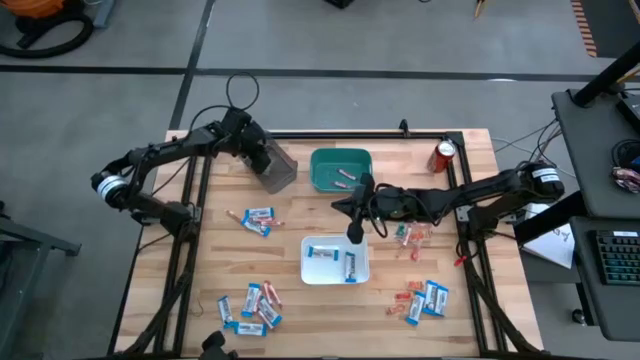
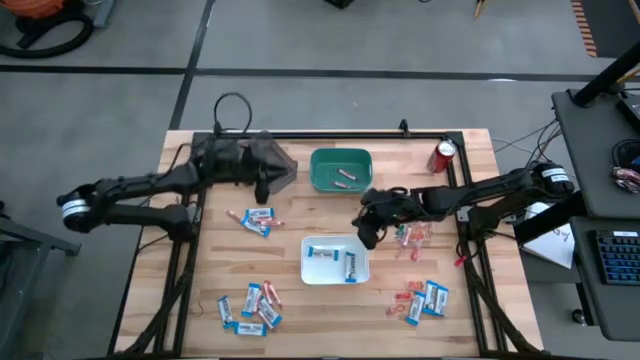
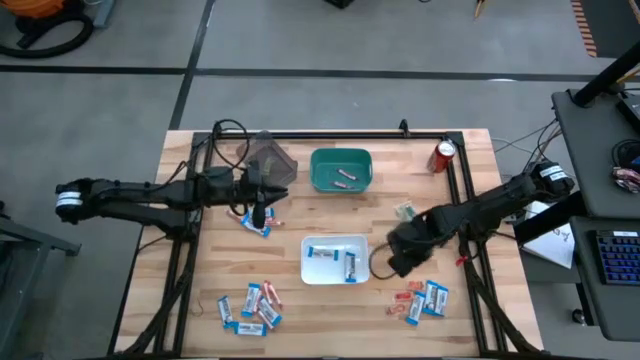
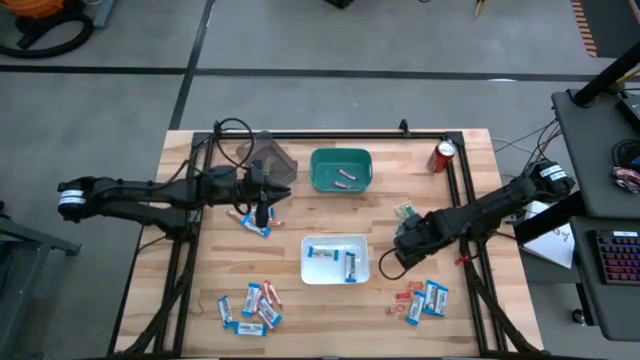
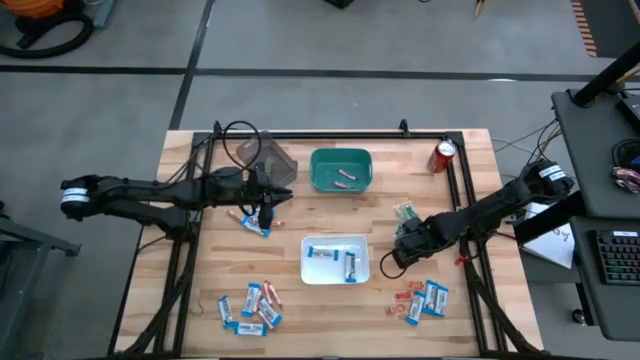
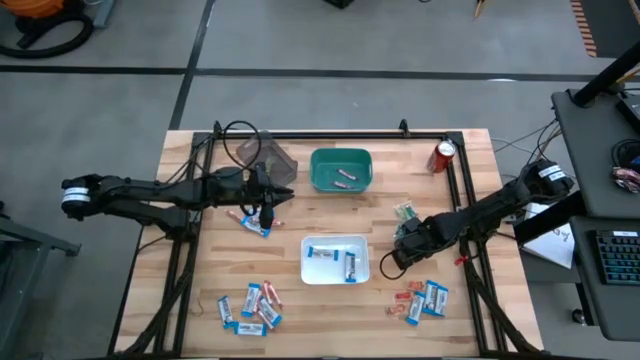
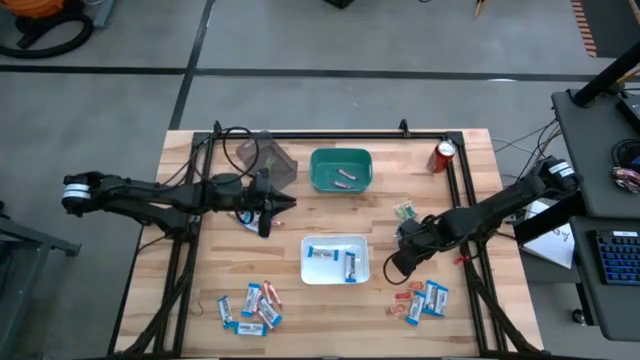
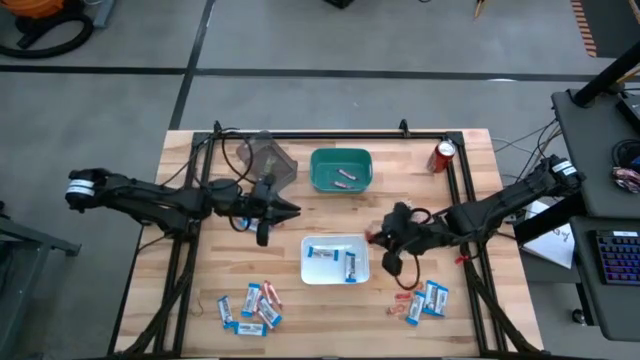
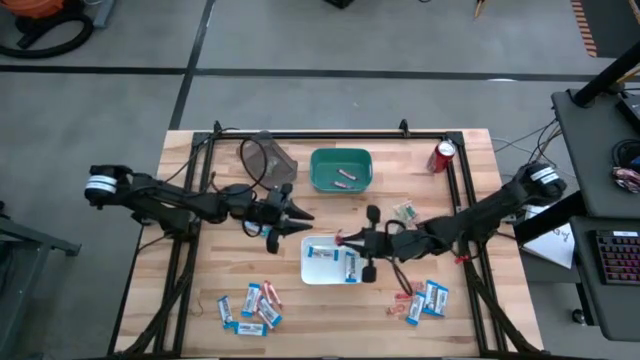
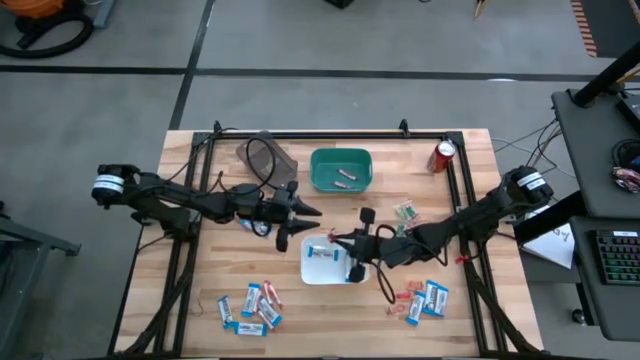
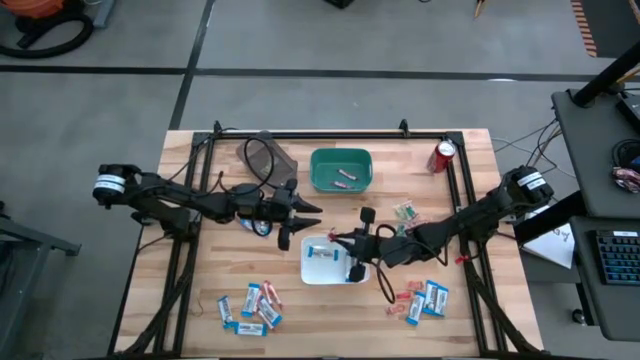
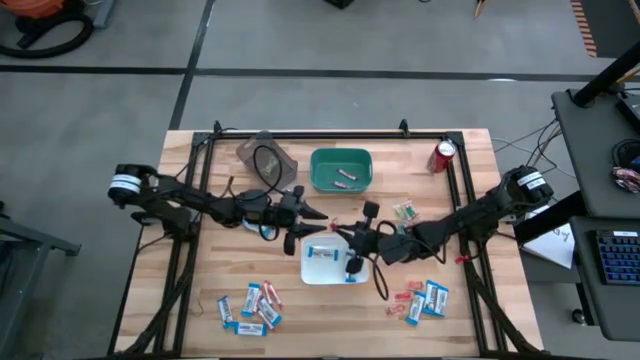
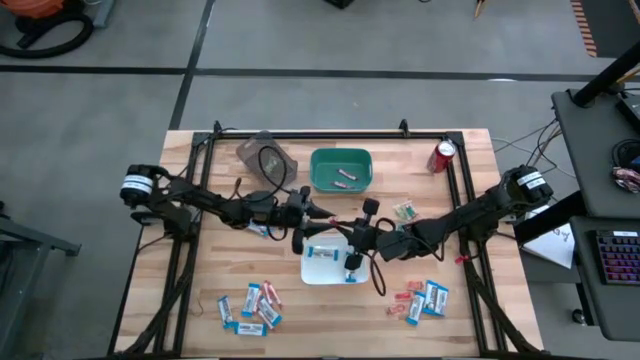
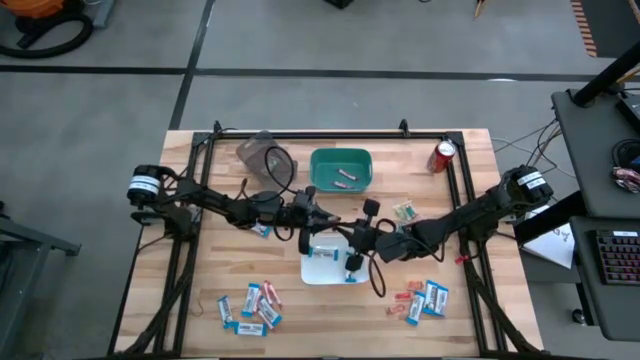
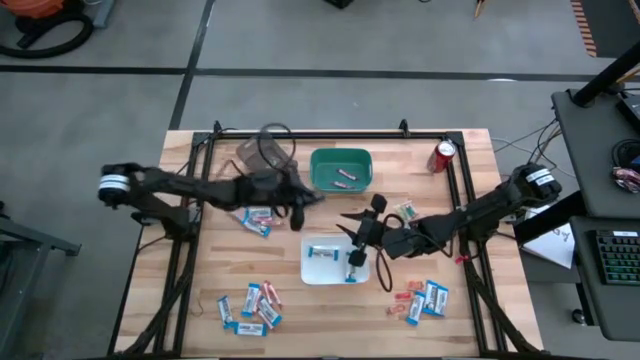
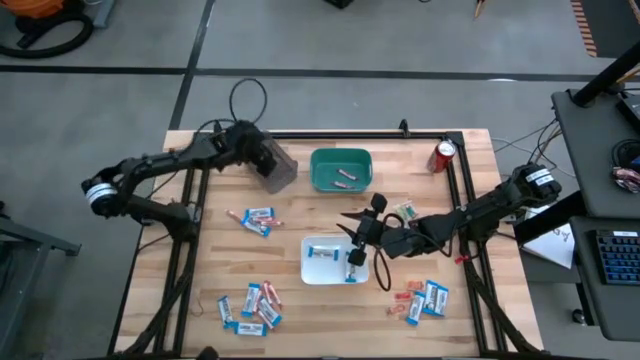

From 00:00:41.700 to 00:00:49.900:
Task: Sort candy
Put the red gummy into the black bin

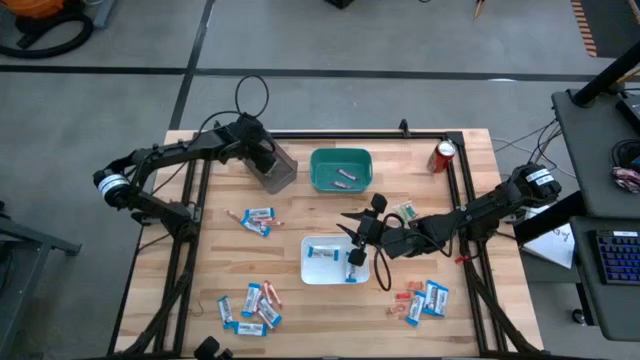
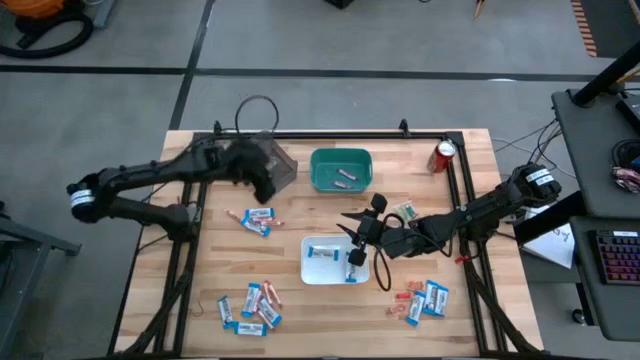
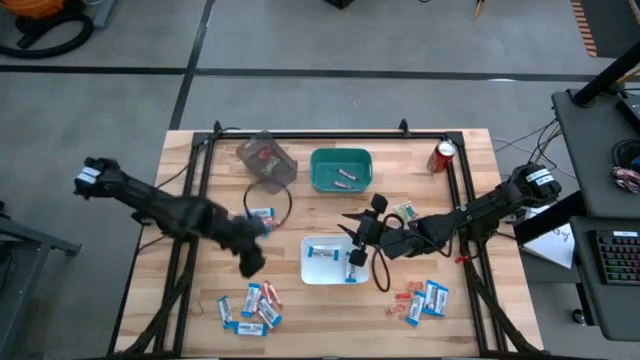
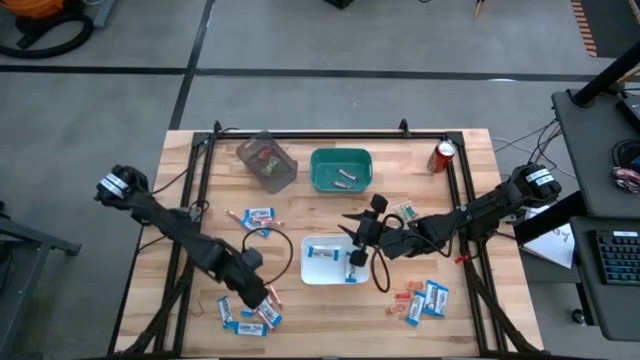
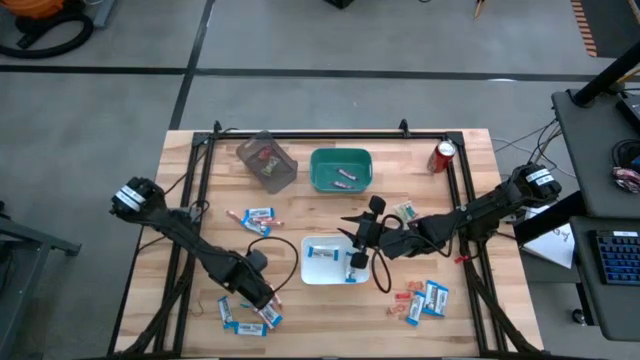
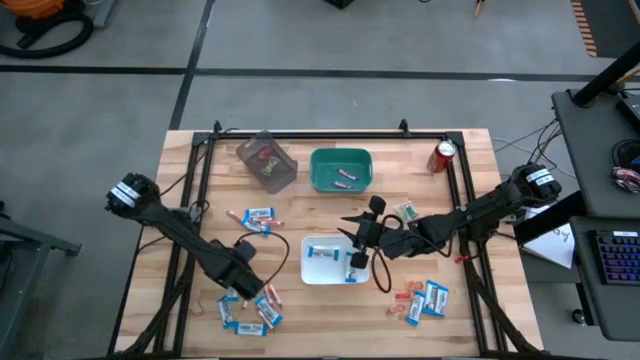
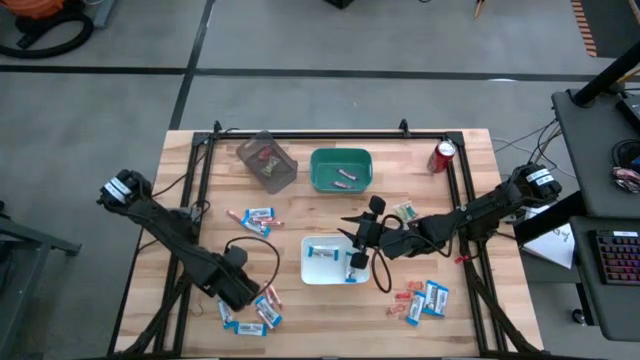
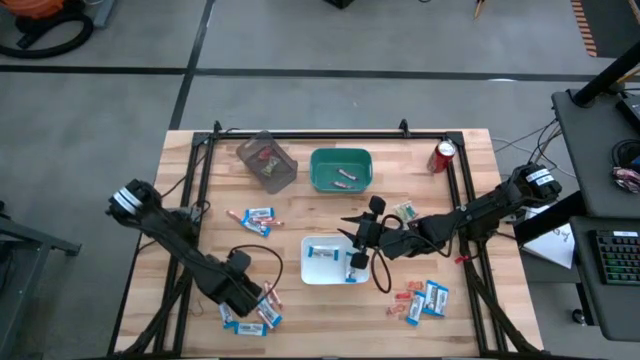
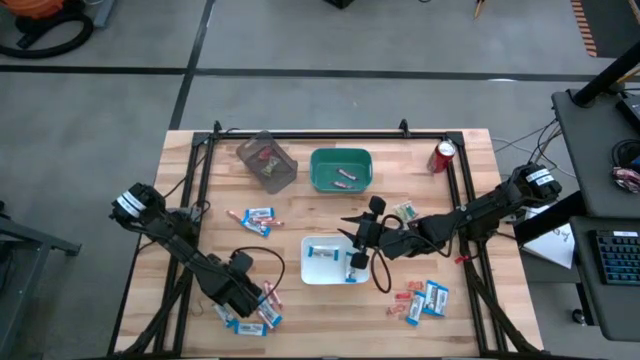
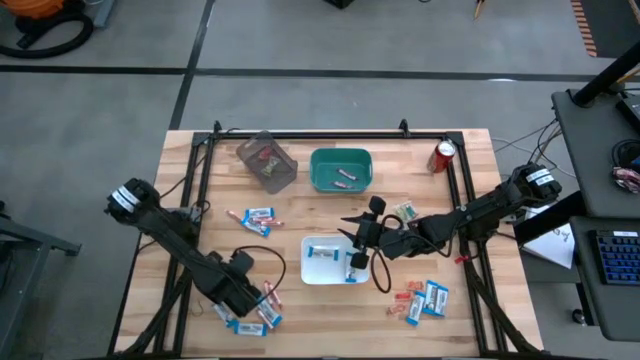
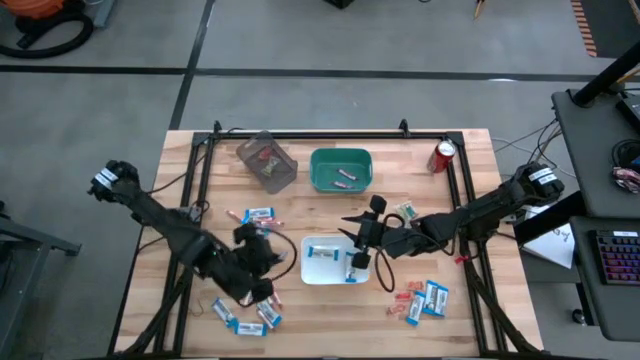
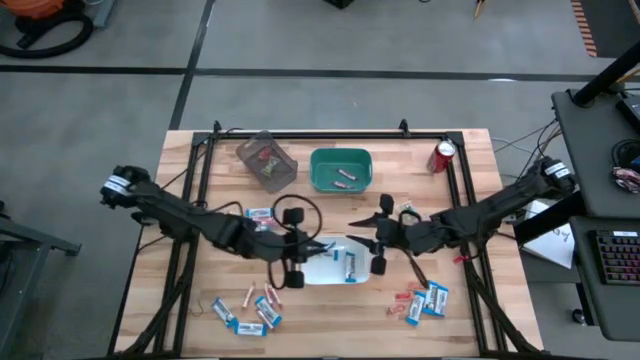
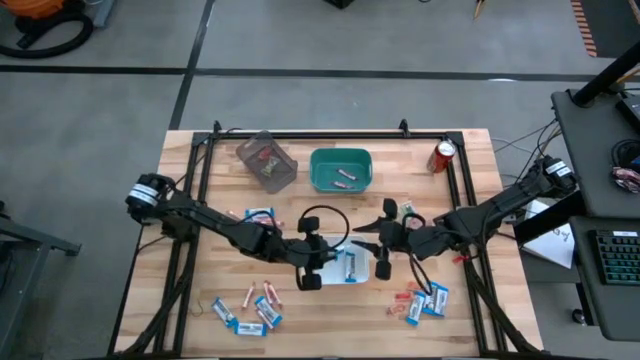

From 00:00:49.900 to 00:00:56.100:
Put the white chocolate bar into the white bin

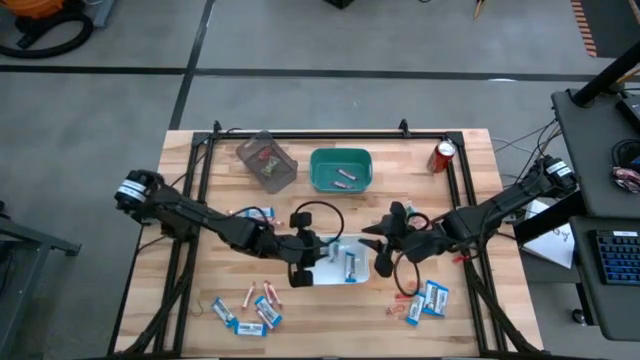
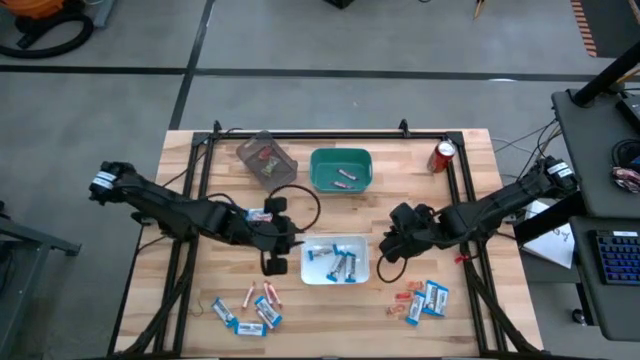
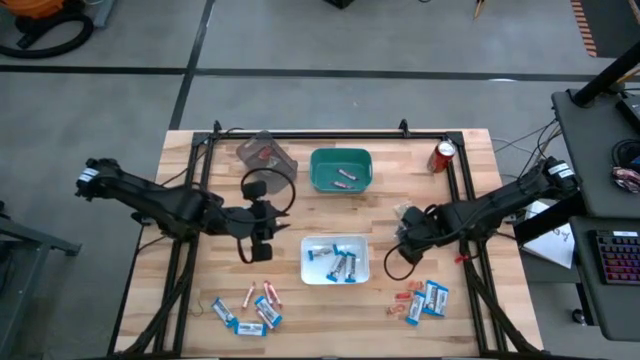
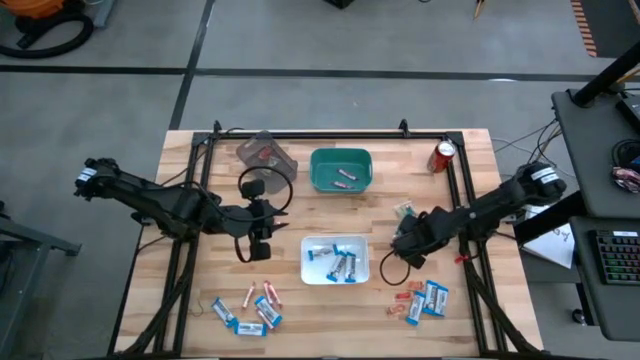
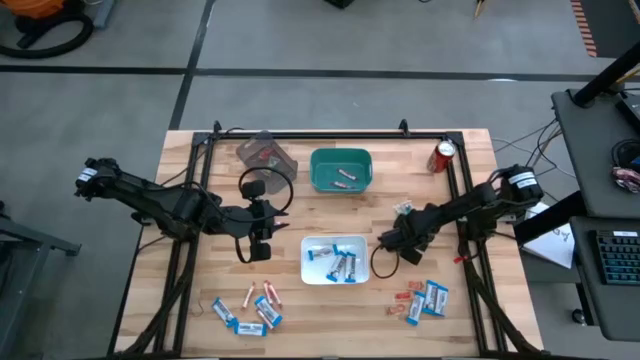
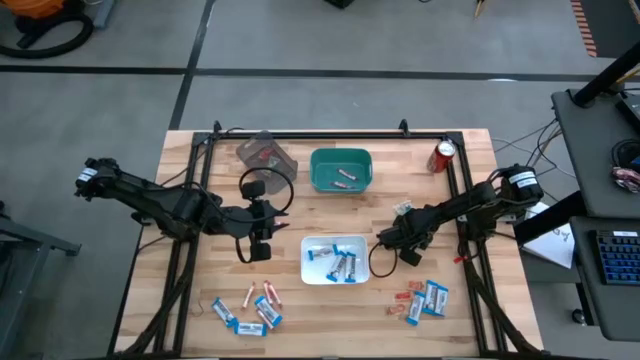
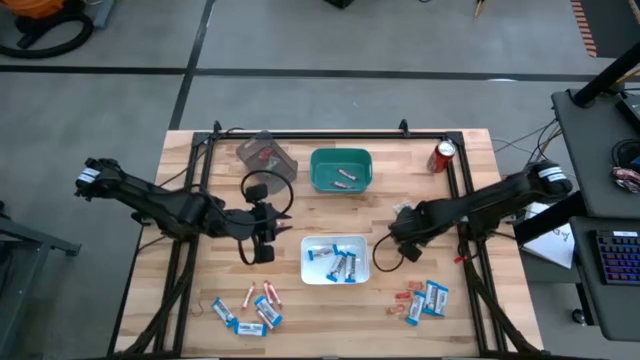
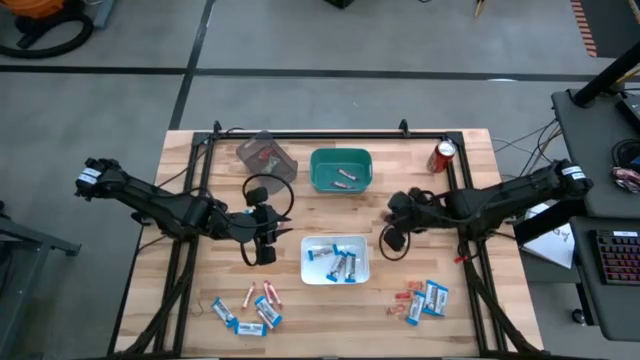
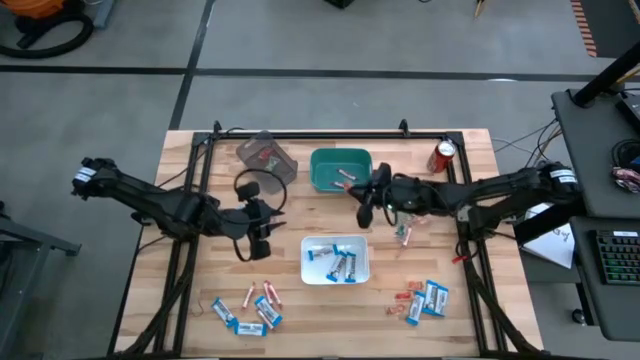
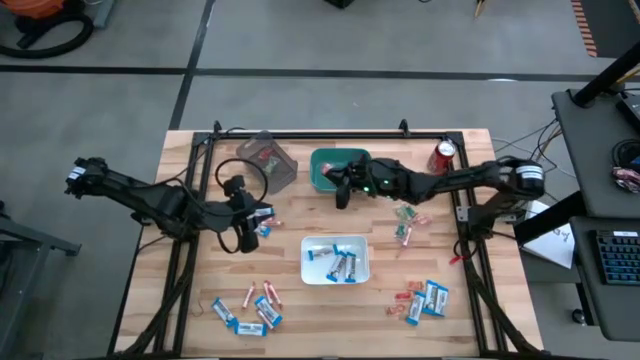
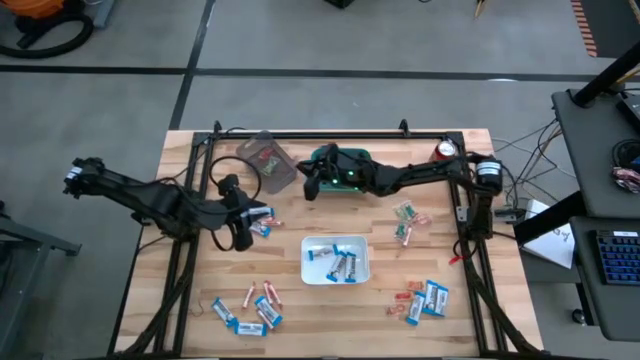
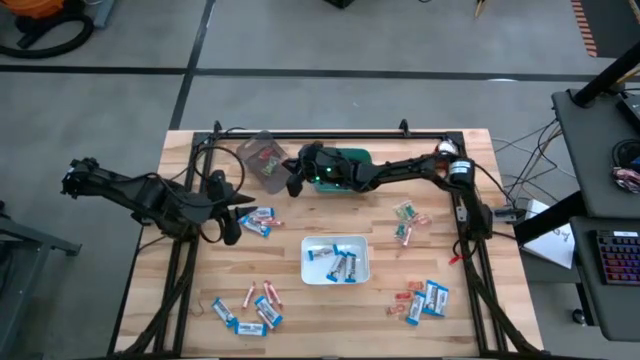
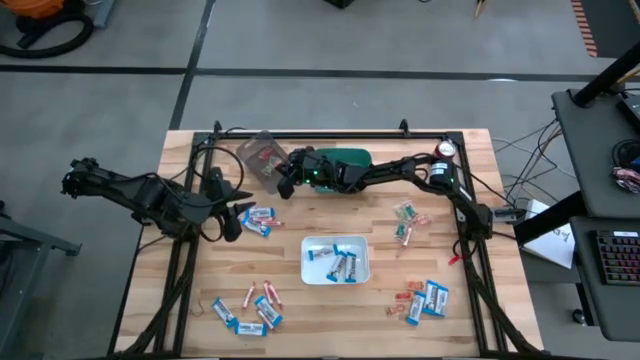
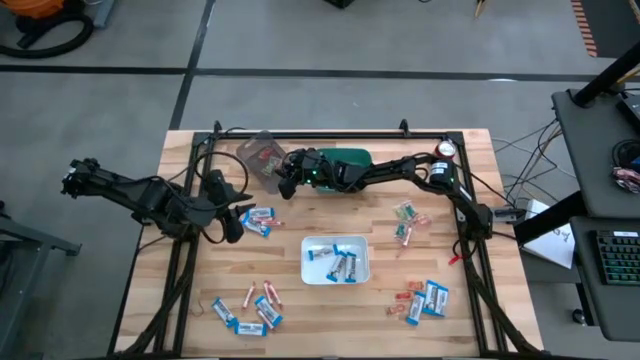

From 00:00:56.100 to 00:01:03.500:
Put the orange gummy into the black bin
